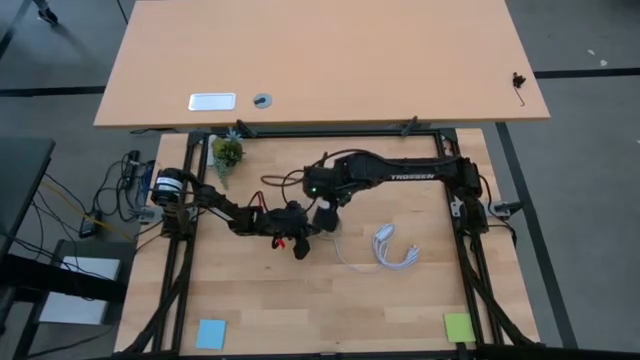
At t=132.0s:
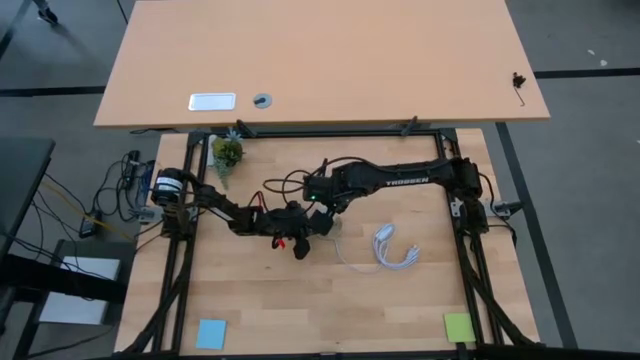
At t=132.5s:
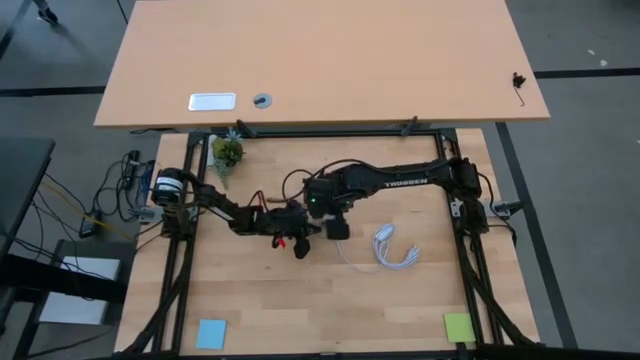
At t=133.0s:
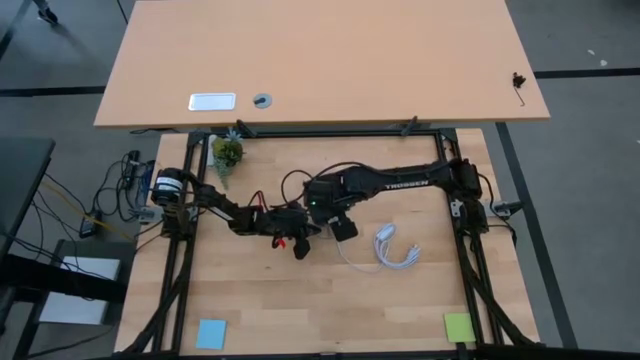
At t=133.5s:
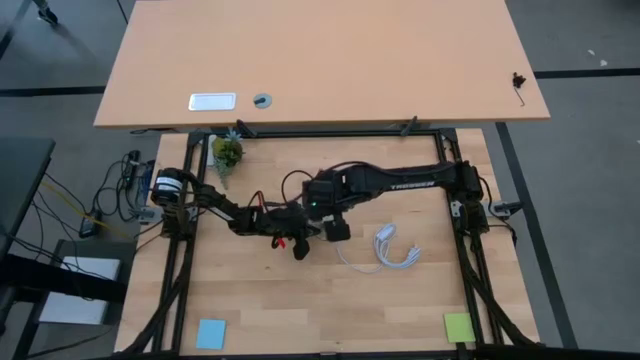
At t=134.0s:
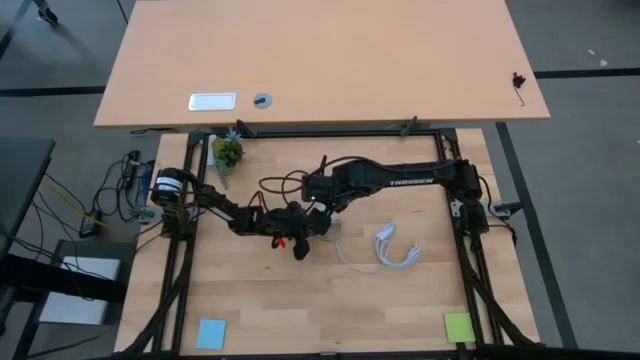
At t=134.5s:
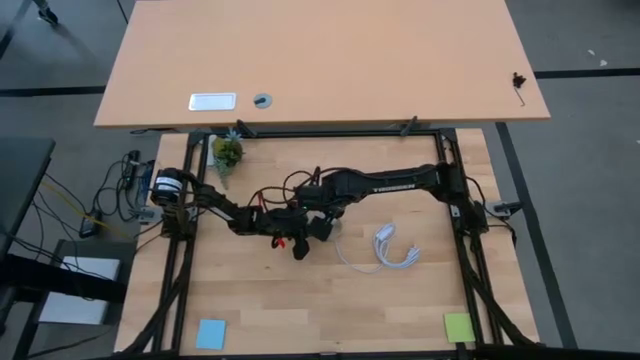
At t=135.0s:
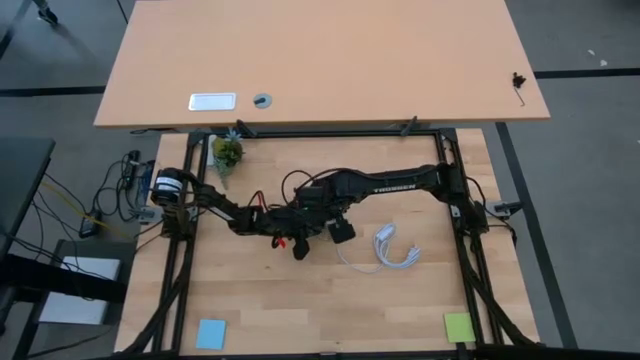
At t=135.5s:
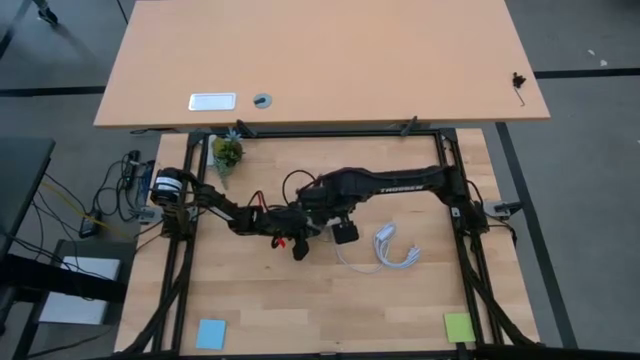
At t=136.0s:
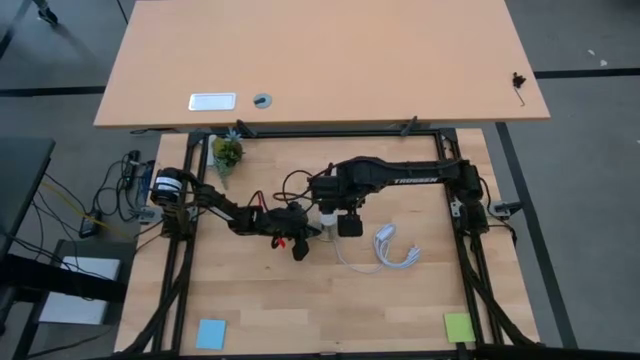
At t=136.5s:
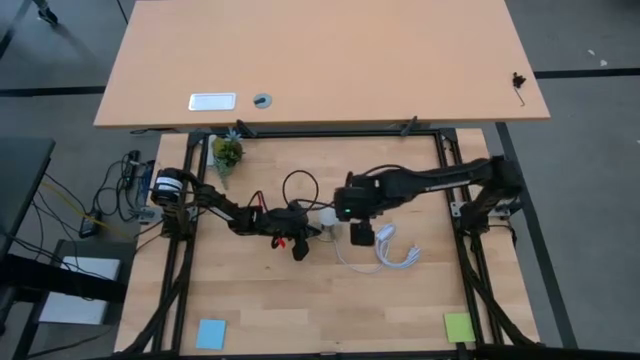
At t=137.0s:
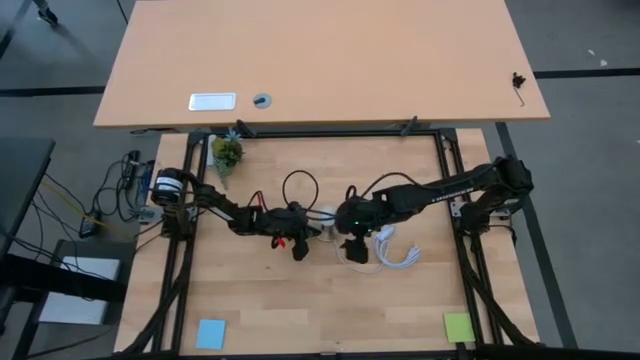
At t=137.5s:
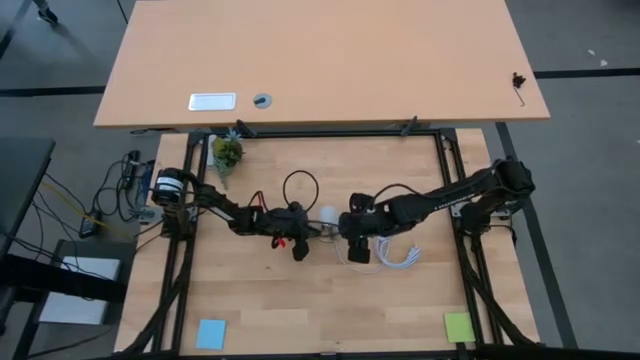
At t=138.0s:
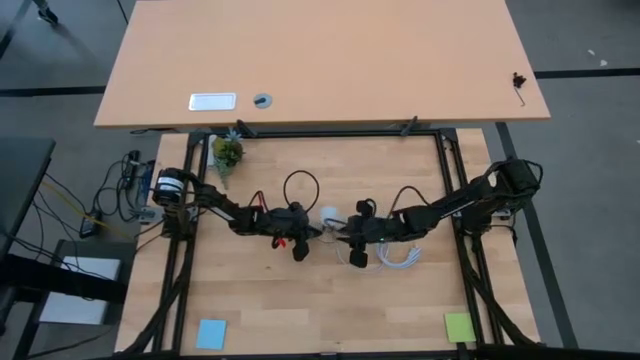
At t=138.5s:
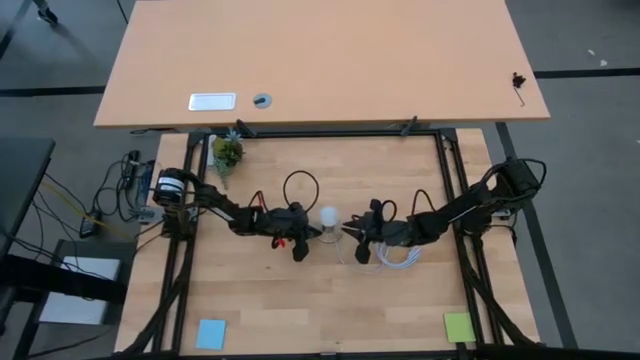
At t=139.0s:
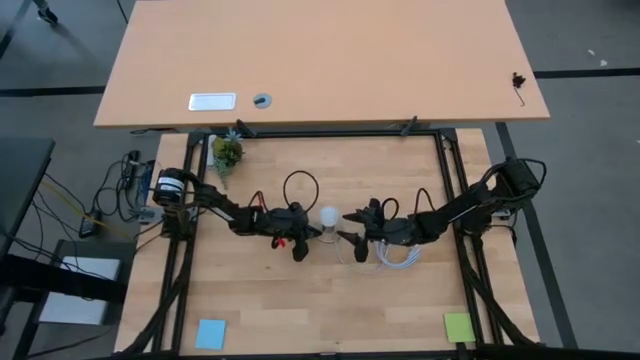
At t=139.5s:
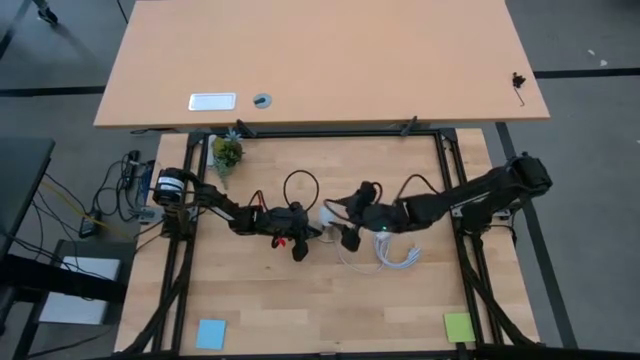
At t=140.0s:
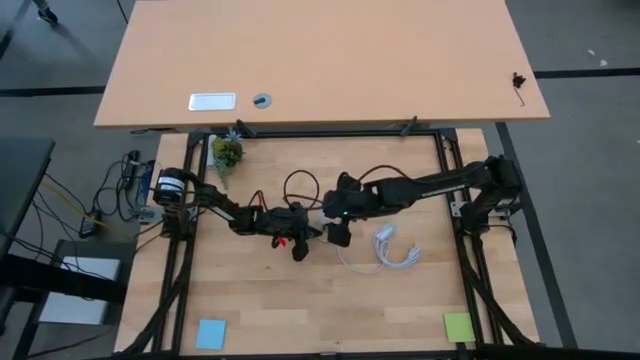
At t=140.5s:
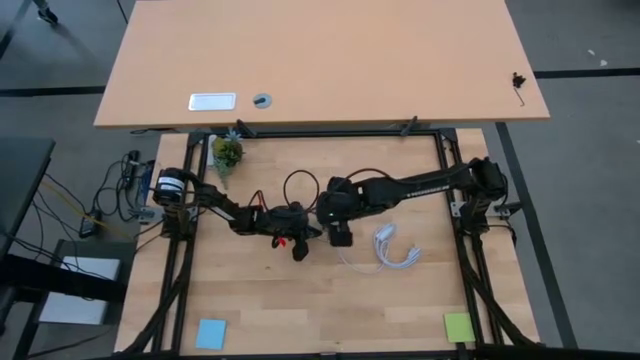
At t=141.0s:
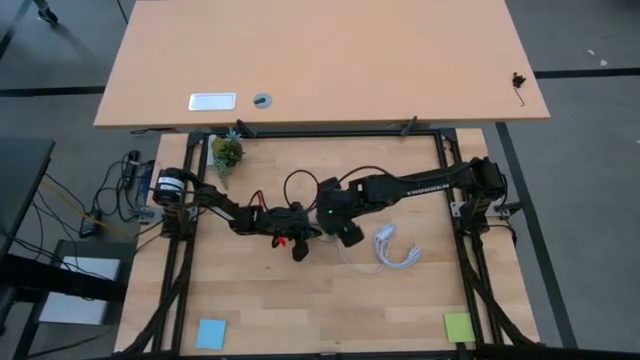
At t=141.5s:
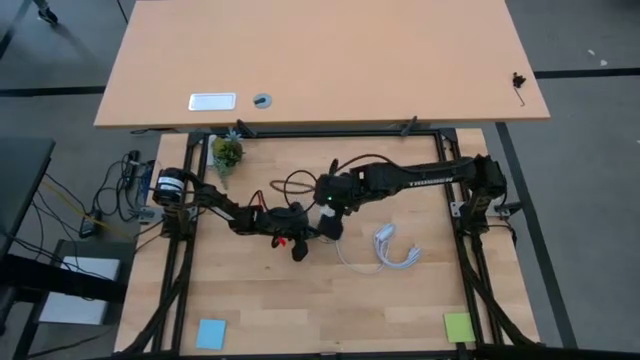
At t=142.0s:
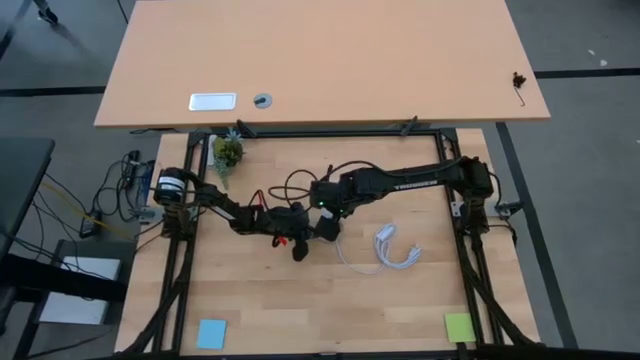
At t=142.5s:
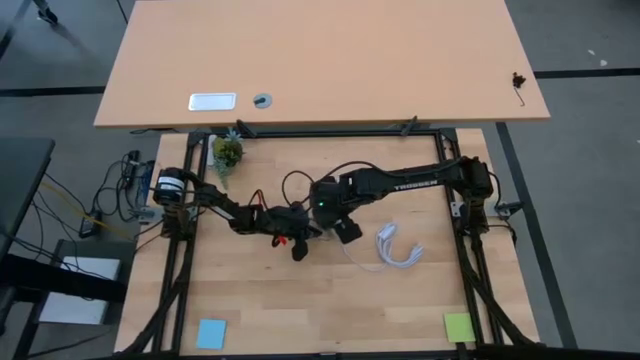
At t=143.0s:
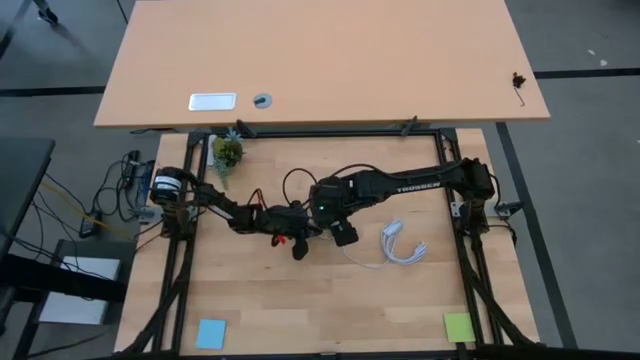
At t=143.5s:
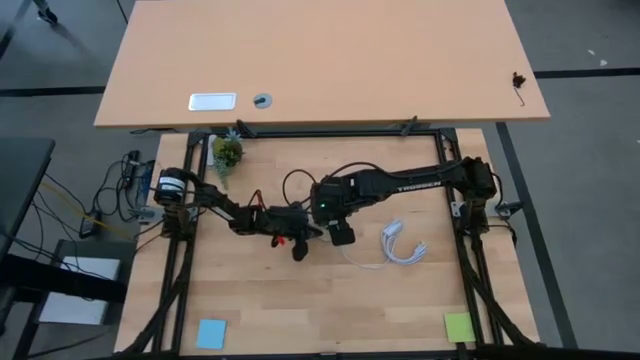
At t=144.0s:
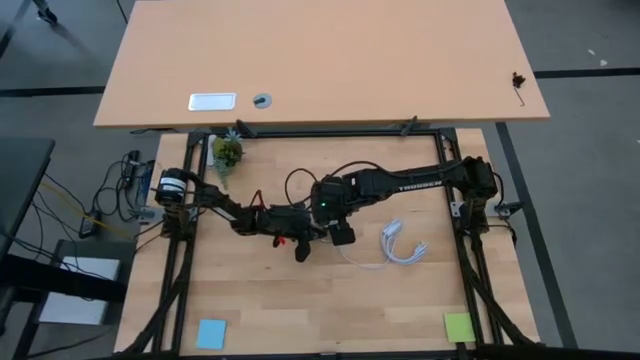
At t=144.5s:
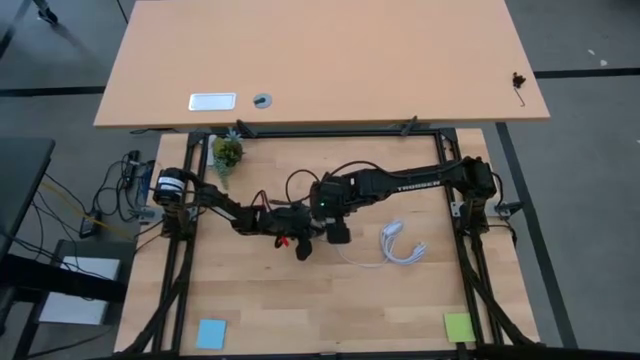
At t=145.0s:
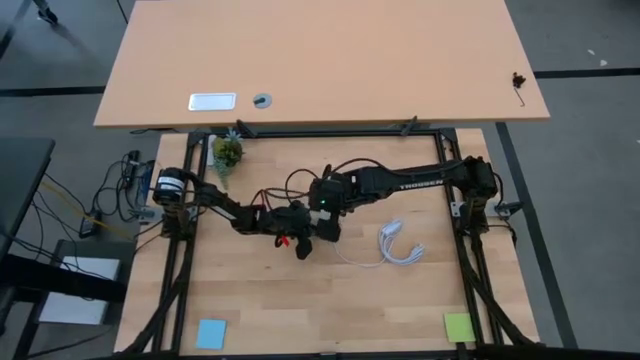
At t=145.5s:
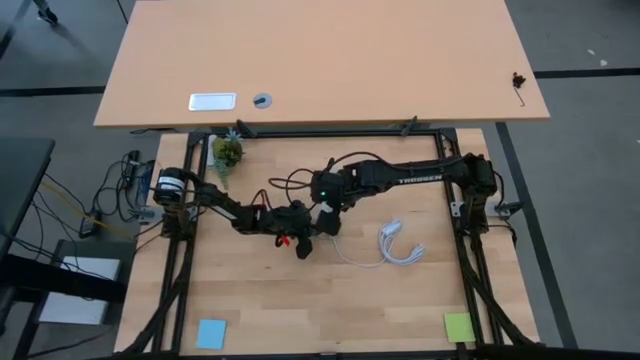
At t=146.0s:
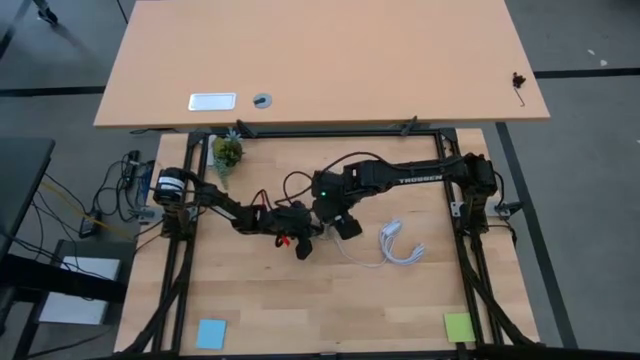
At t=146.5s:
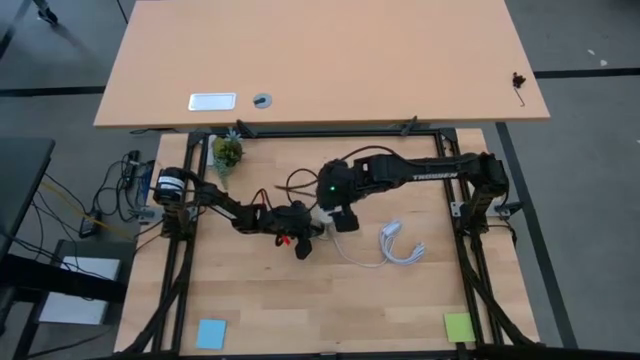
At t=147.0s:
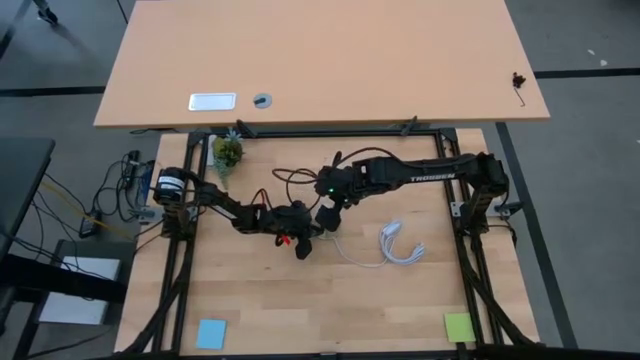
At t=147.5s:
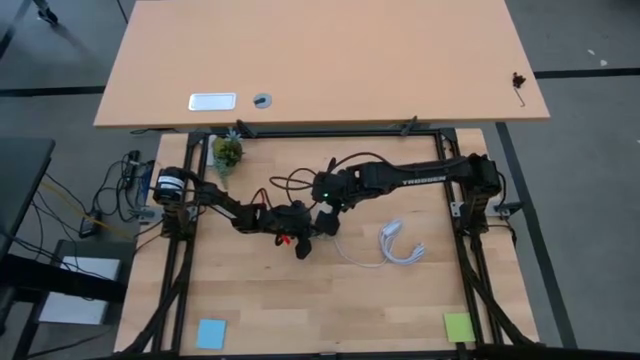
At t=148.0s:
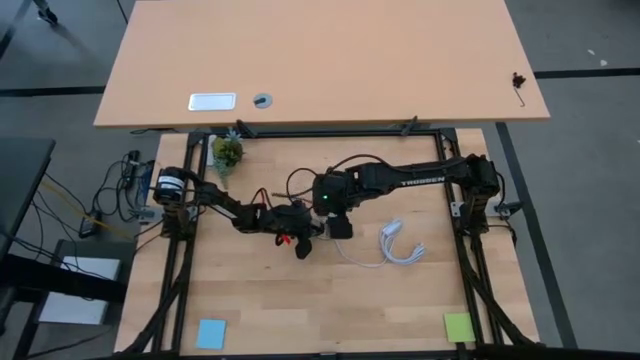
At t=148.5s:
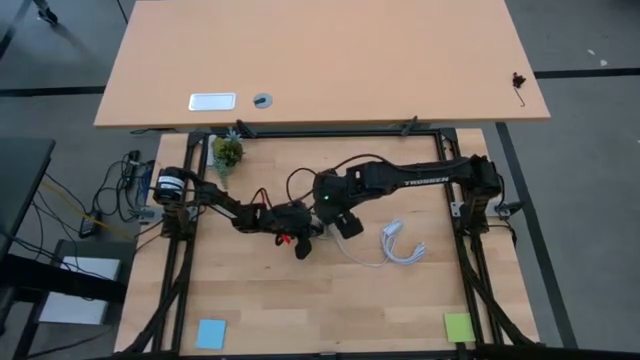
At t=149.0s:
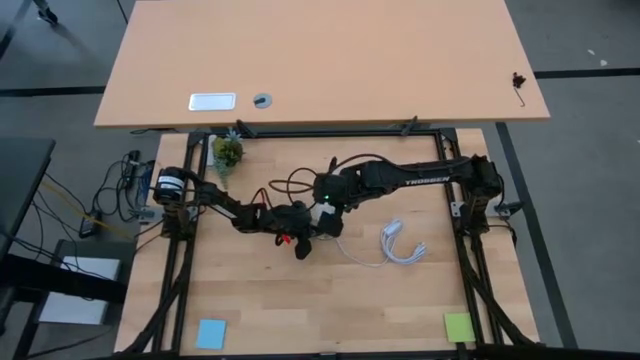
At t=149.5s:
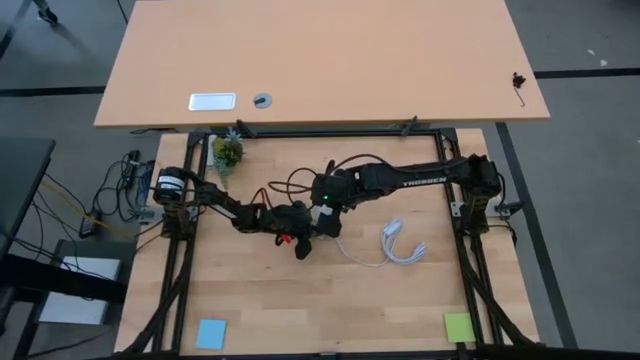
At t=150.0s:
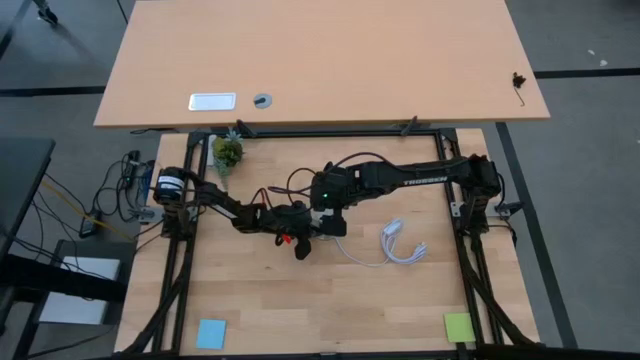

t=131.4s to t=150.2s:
Task: Screw lightbulb
Remove the lightbulb from the lamp socket

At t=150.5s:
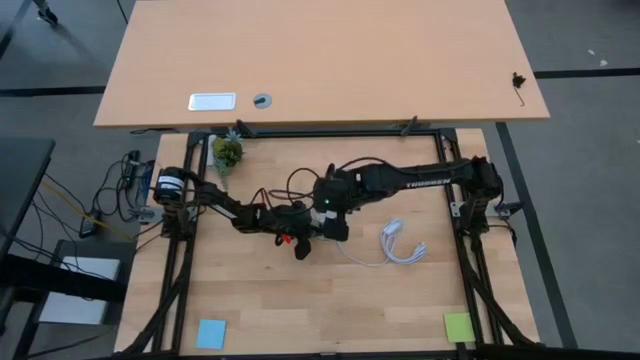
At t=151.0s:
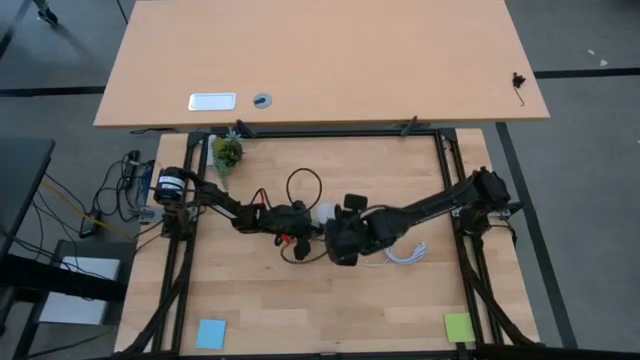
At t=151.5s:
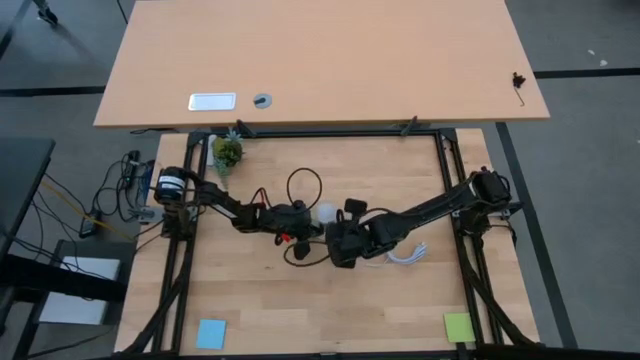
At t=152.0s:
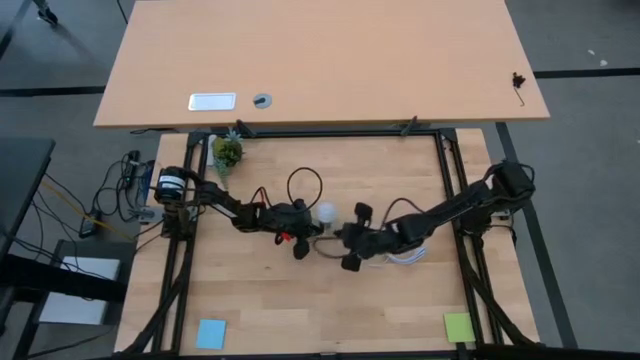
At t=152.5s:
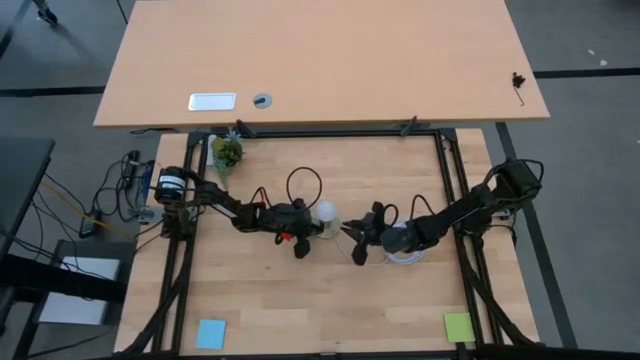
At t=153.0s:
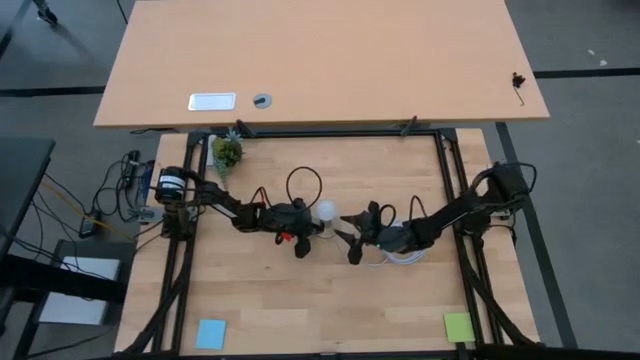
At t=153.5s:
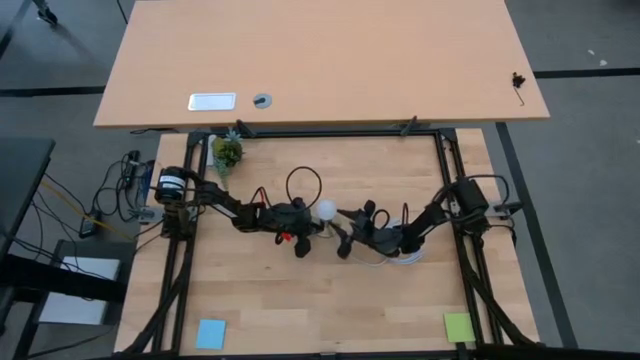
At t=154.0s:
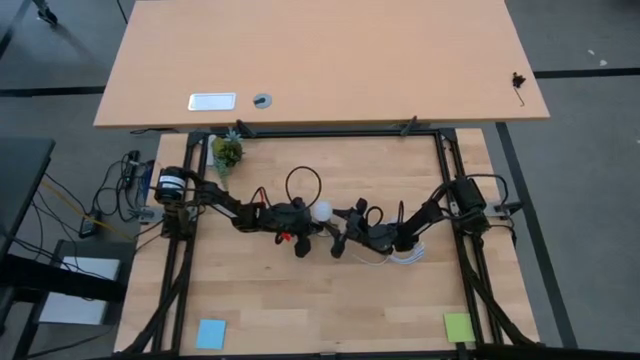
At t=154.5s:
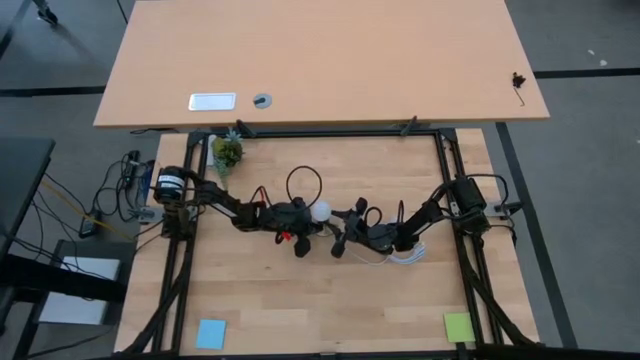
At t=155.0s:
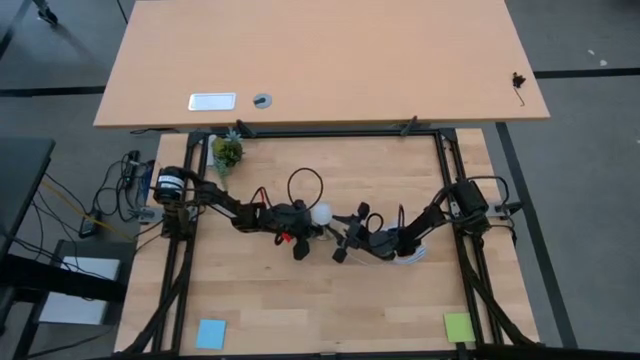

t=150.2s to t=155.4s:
Remove the lightbulb from the lamp socket
